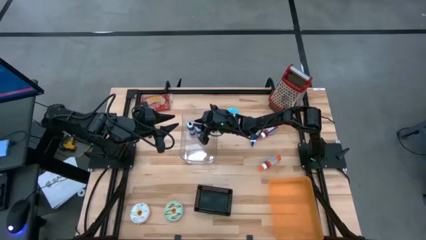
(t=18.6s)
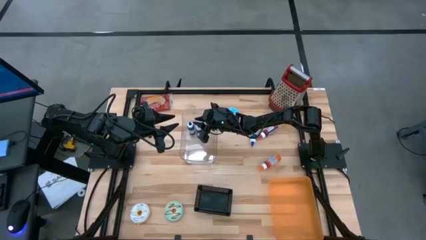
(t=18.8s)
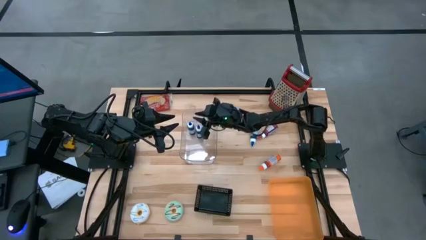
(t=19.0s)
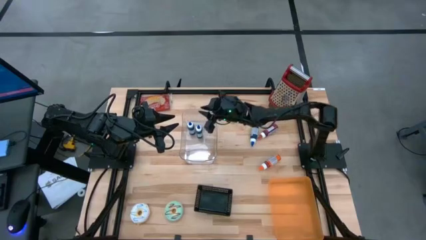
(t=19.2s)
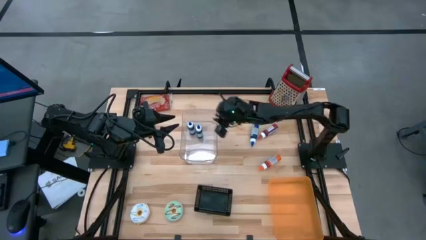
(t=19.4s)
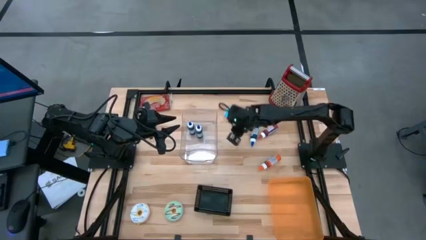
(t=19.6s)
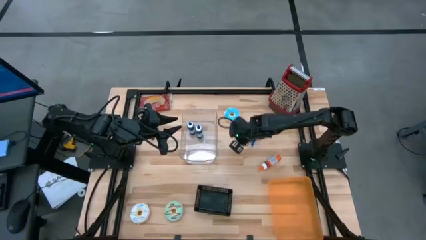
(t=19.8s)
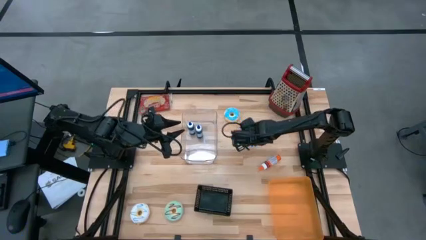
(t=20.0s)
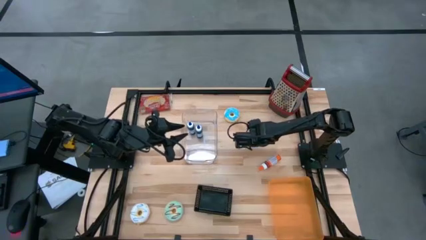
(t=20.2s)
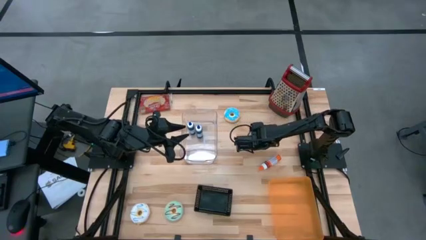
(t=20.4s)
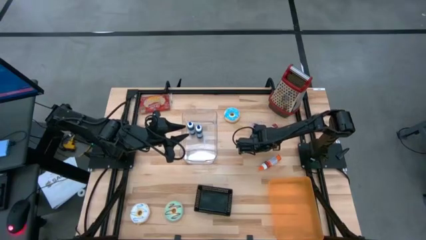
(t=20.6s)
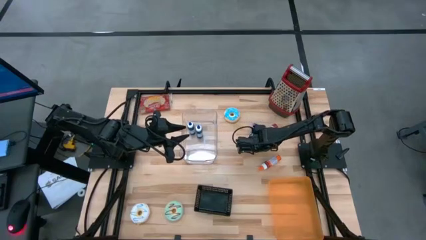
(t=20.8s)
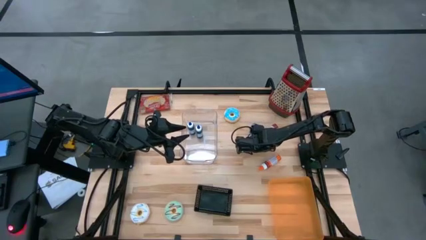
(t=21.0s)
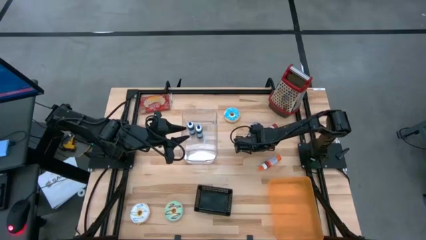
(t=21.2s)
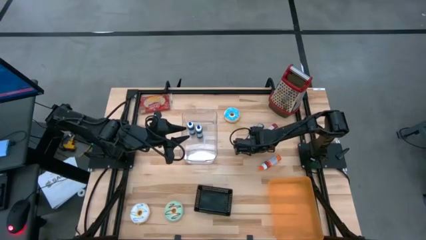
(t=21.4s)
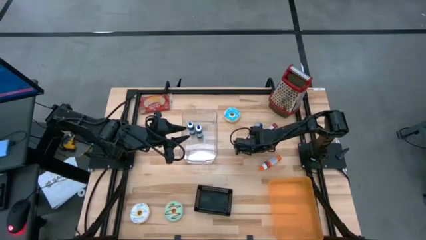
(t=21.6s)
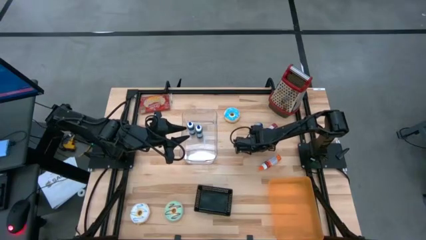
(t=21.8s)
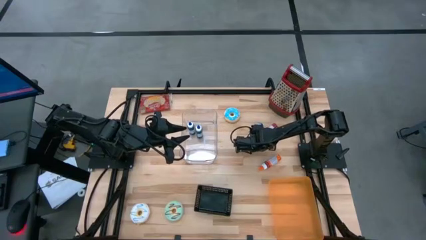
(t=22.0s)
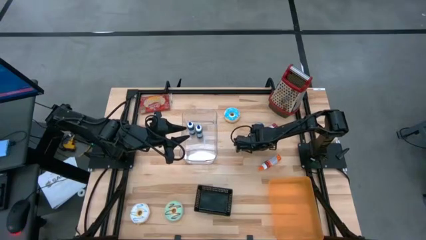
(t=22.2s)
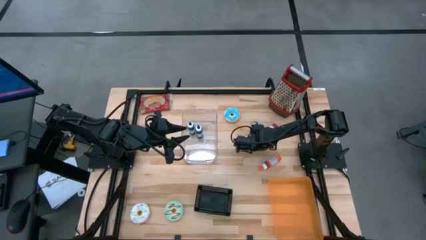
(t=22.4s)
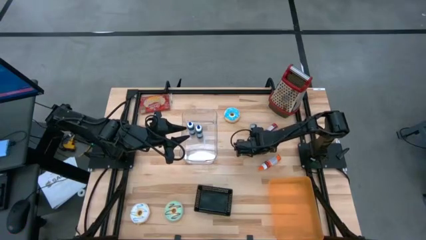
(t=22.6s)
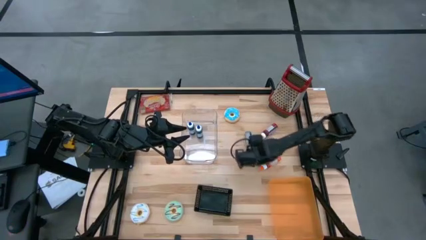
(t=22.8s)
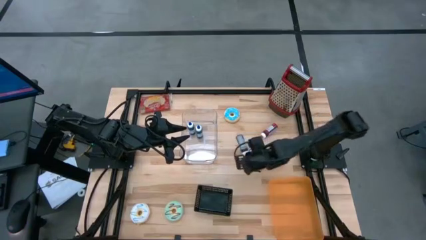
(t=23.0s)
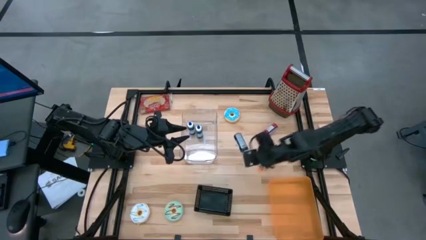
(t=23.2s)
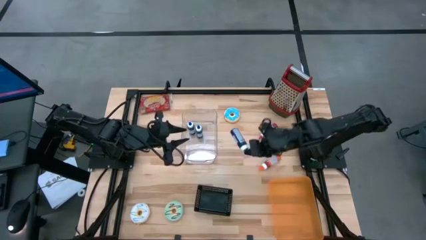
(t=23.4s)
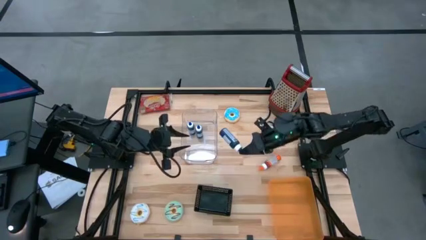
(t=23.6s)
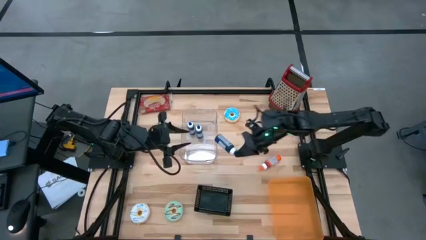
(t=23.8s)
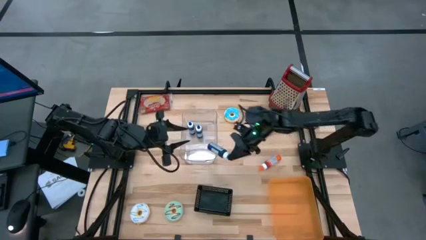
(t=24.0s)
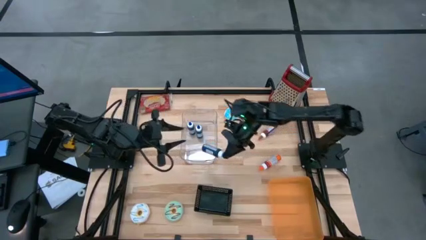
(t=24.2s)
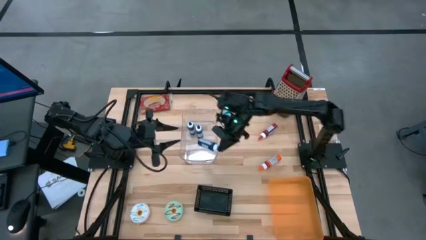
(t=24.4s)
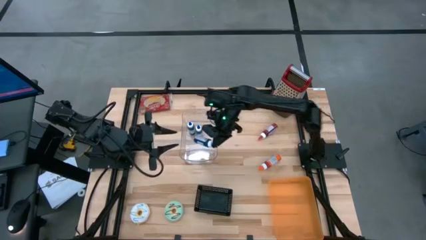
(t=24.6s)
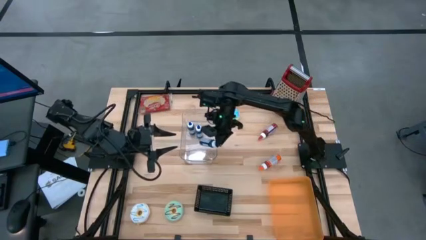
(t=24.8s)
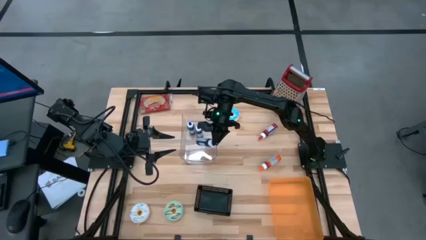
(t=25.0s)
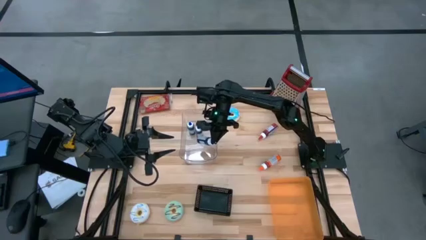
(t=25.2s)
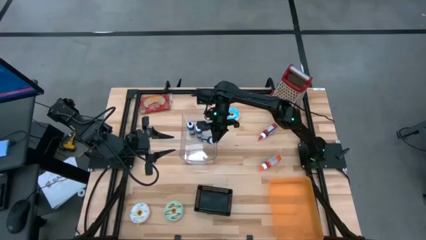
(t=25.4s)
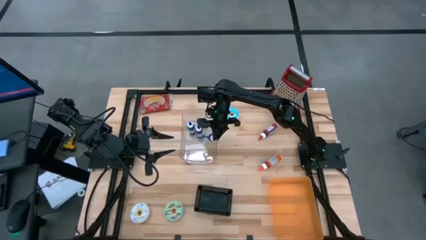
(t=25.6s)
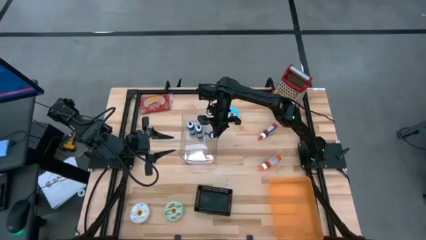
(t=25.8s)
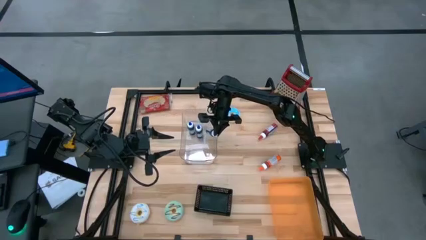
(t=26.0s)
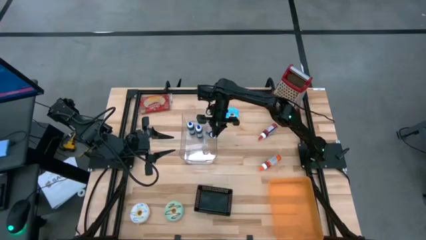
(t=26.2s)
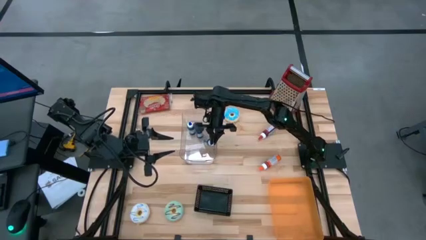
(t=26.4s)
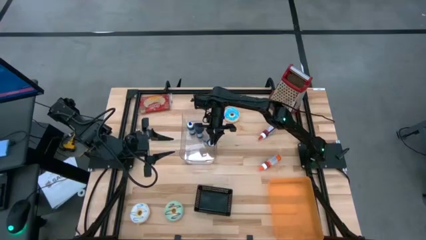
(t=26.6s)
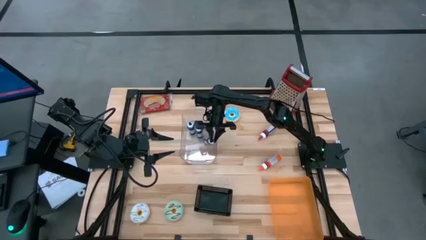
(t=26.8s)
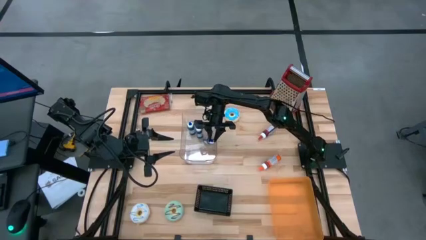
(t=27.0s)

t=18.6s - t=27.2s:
Put the blue food coloring bottle into the transparent bin

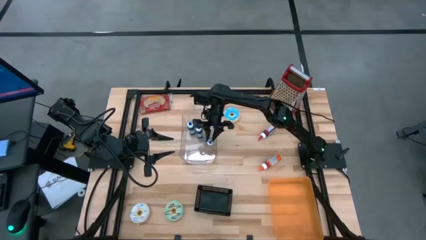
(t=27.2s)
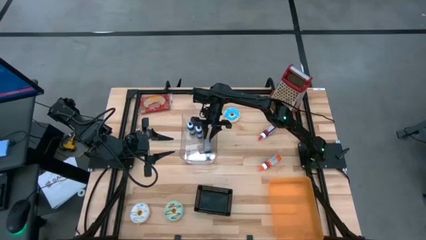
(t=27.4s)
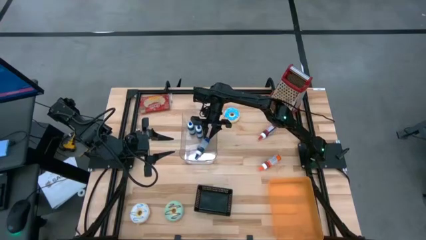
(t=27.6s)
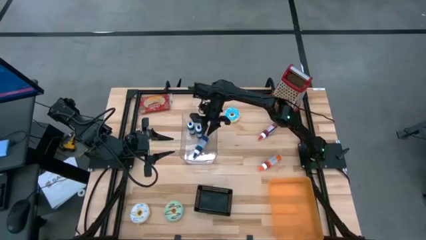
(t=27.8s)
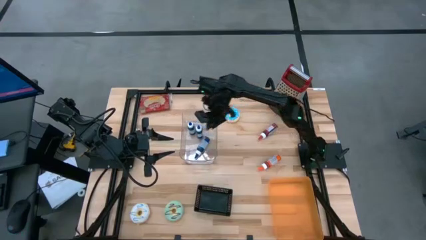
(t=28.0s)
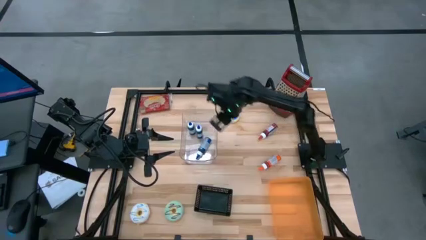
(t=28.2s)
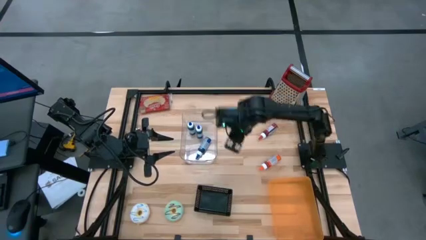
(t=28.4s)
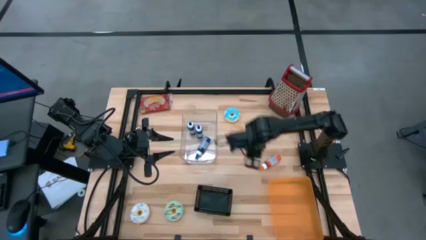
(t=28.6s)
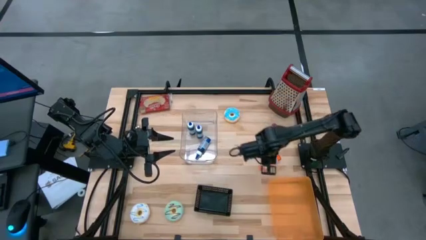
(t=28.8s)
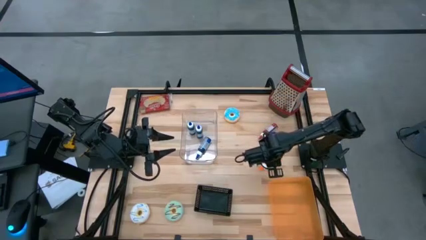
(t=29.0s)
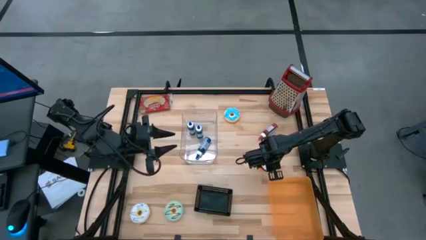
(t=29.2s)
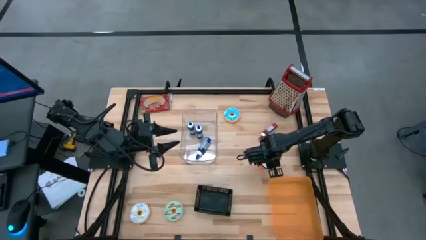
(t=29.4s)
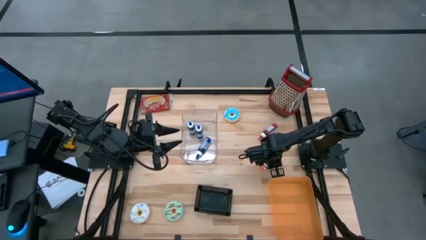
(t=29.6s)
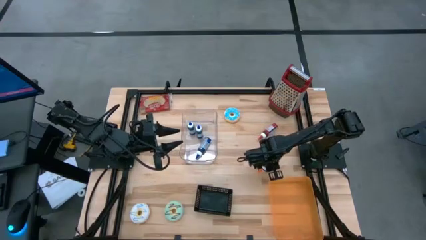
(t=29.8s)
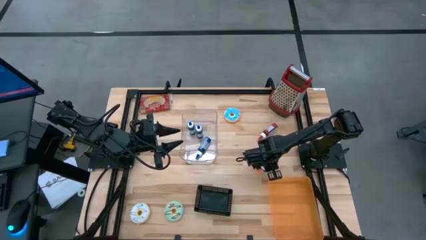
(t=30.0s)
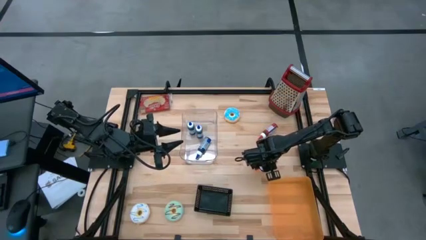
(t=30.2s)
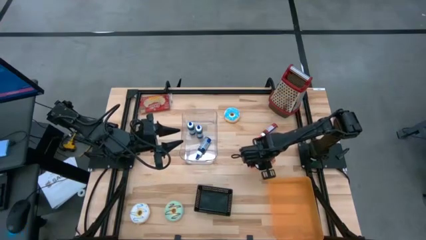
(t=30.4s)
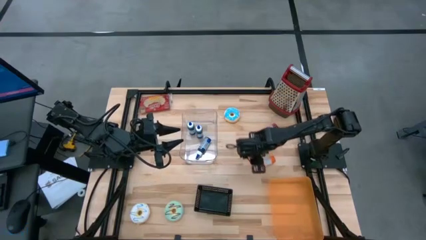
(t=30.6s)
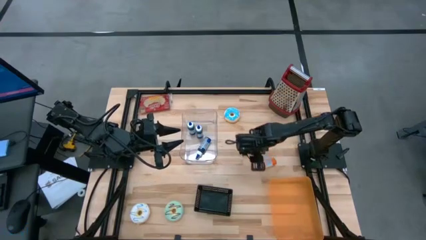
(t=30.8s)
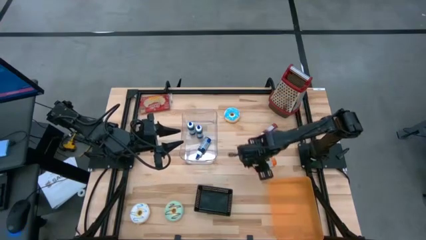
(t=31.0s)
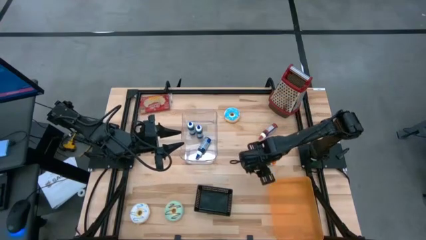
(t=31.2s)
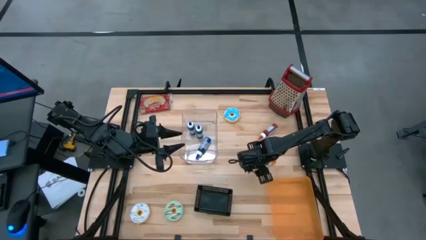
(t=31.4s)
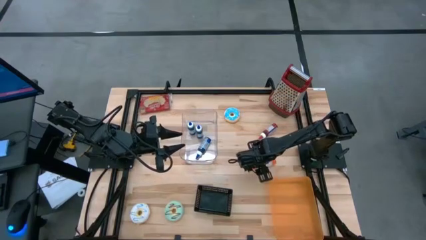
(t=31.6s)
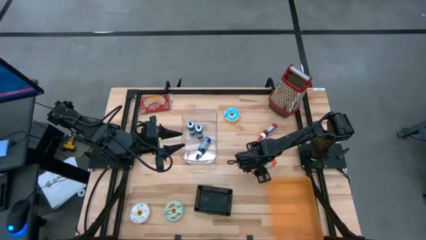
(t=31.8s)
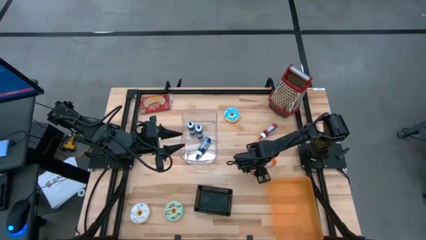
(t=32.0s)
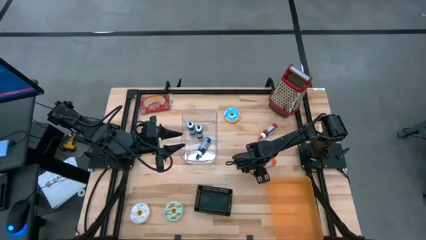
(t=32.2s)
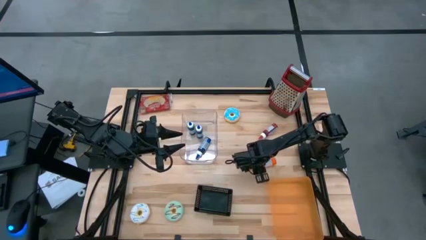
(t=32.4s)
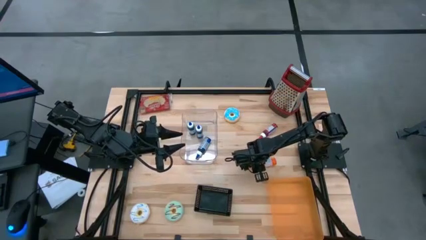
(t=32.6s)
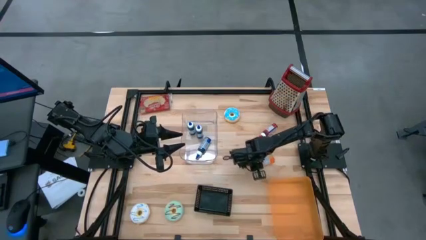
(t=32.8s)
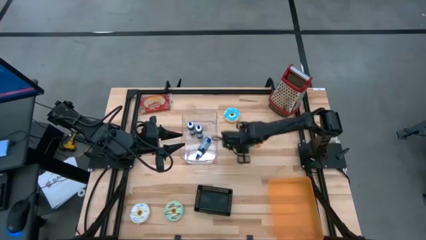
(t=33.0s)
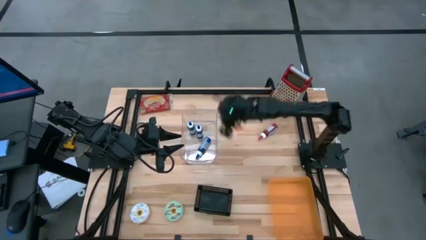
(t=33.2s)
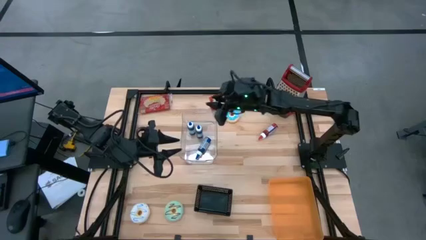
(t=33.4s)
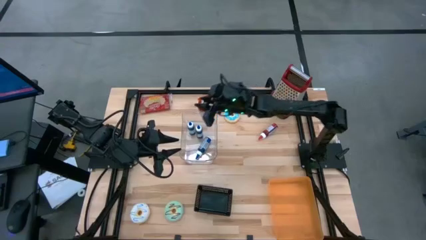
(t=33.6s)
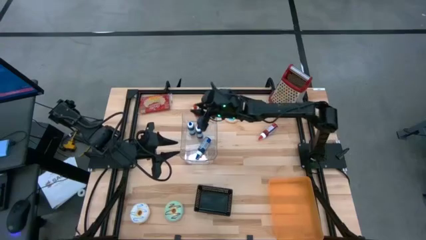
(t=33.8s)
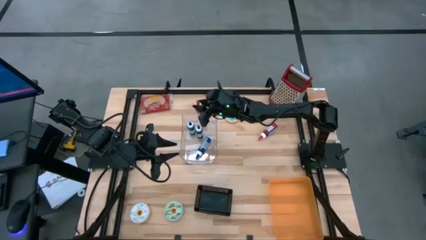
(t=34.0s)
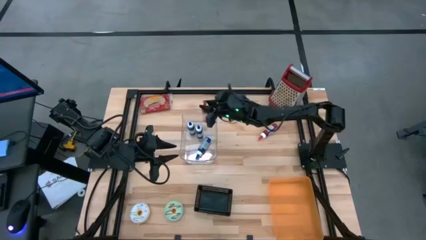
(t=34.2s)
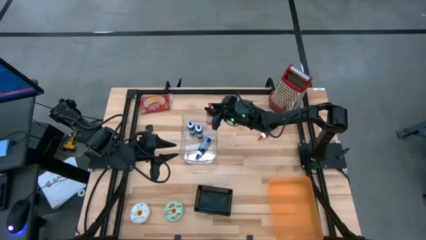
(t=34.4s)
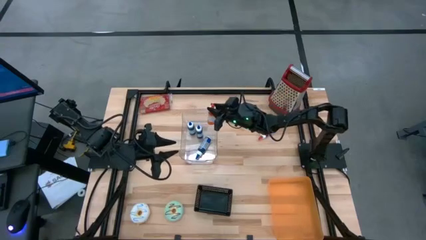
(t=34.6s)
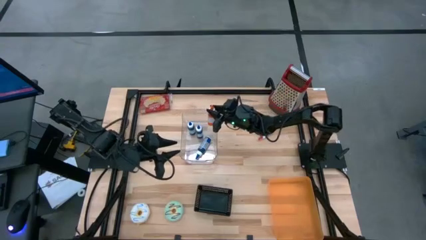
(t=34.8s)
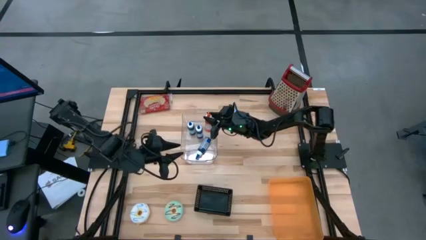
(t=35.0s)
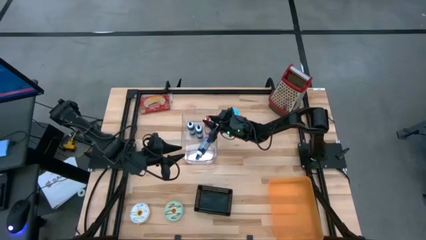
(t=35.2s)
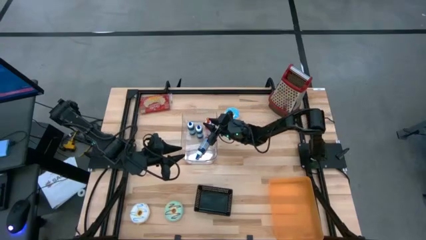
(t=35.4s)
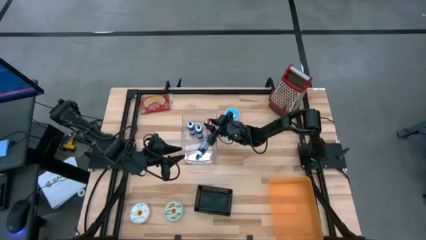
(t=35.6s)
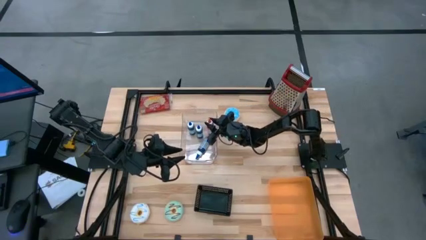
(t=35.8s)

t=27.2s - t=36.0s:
Put the orange food coloring bottle into the transparent bin
